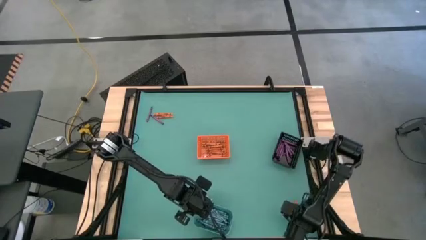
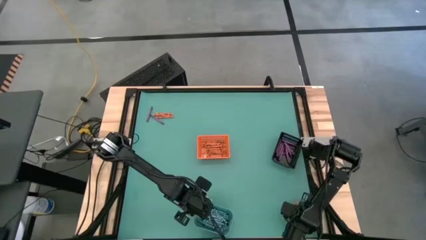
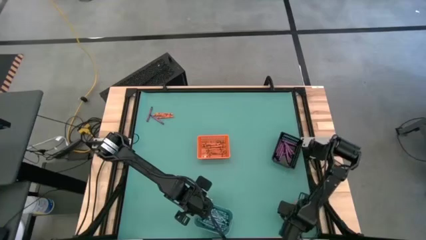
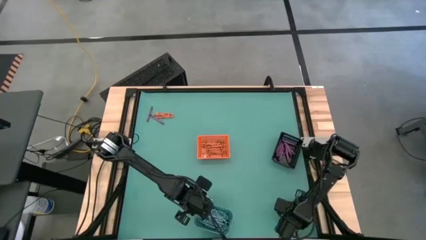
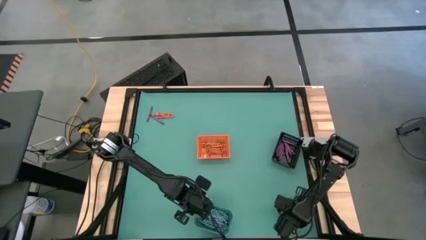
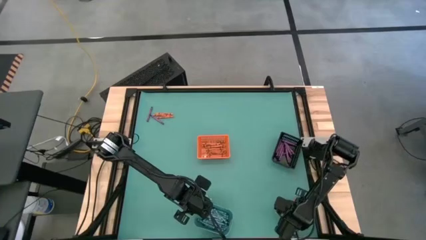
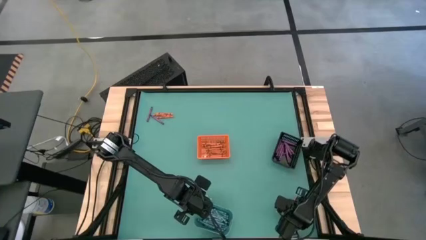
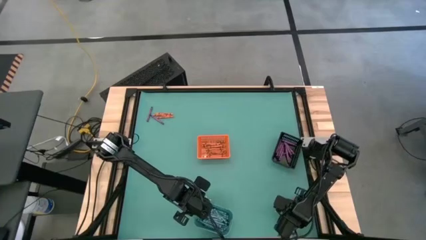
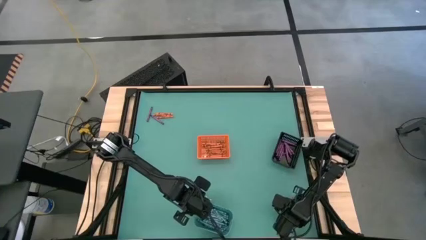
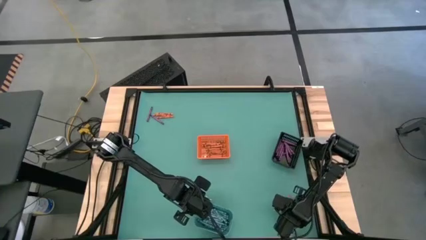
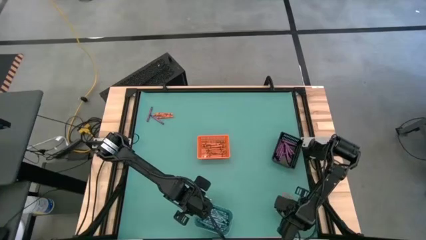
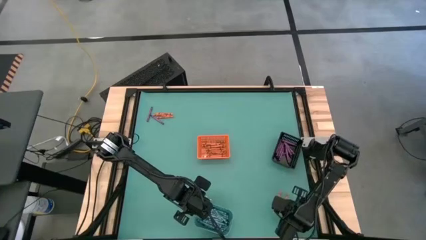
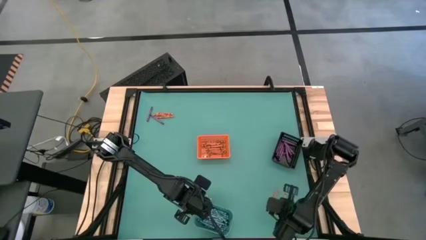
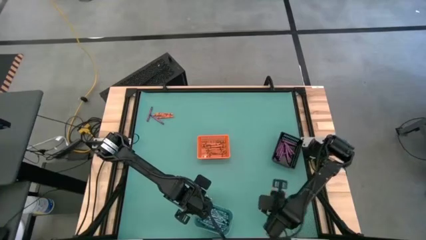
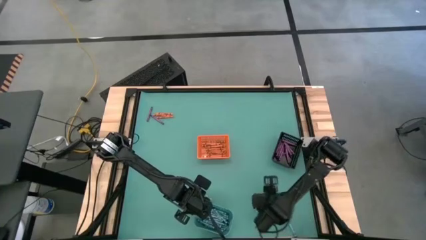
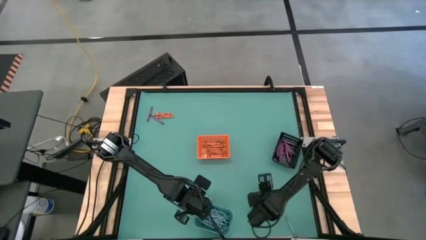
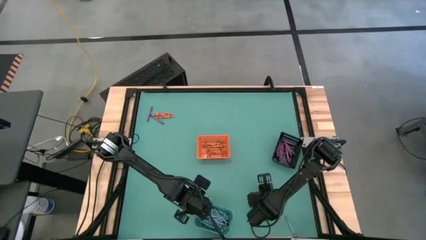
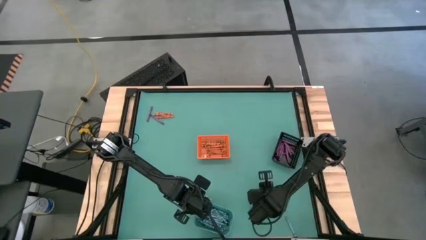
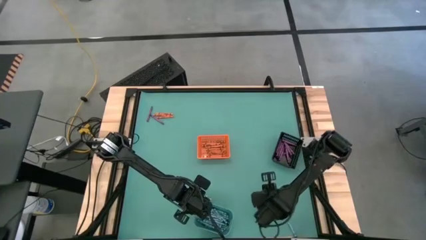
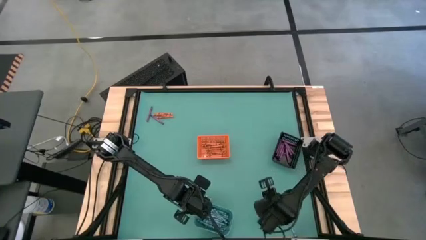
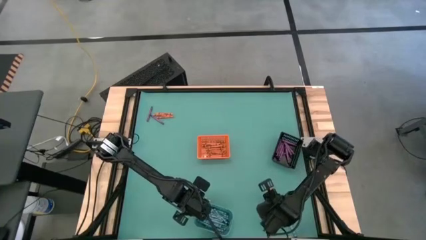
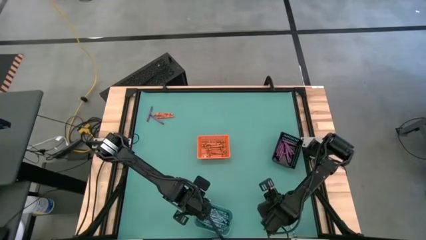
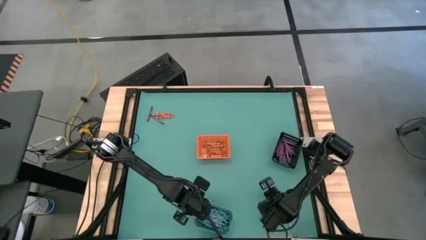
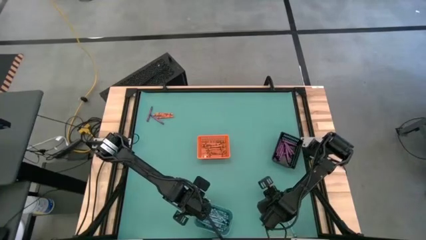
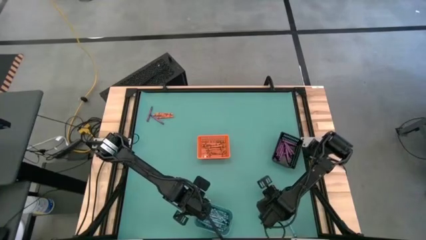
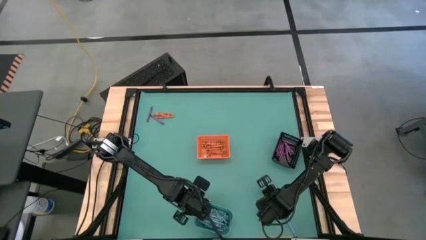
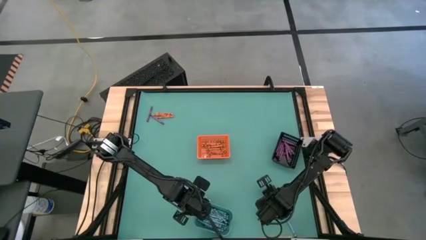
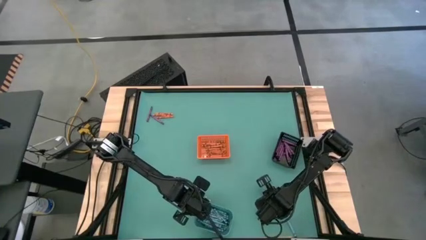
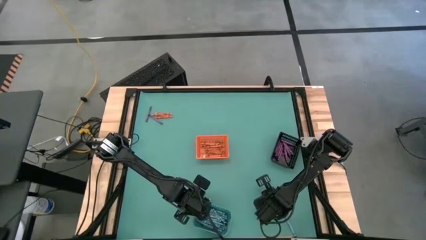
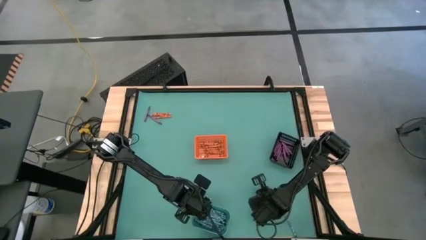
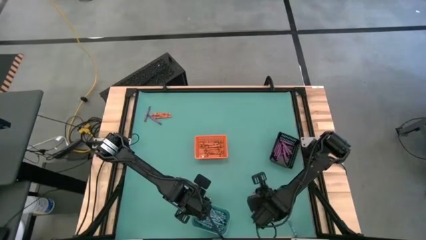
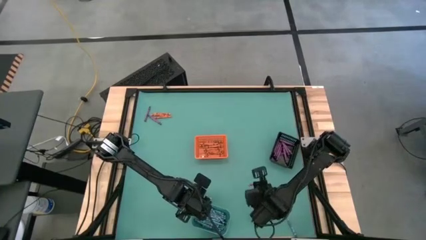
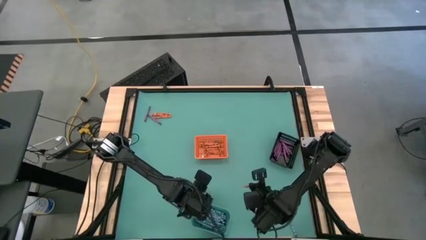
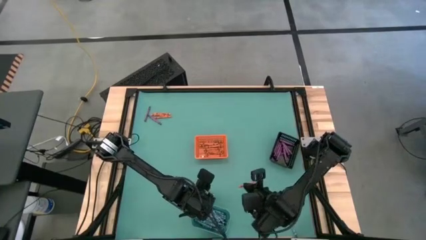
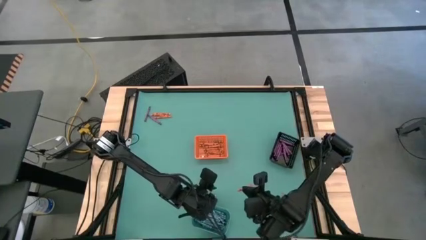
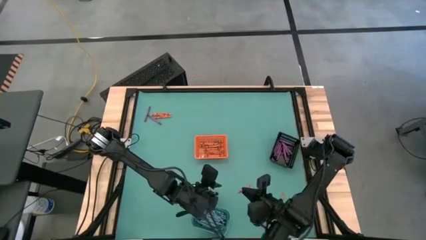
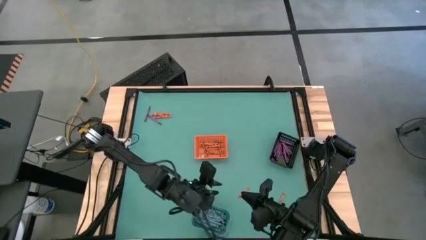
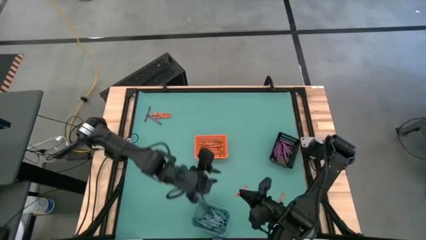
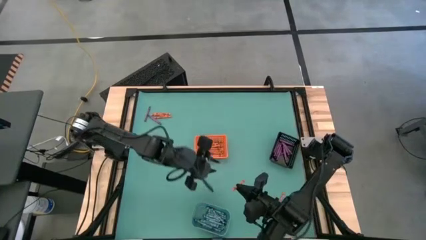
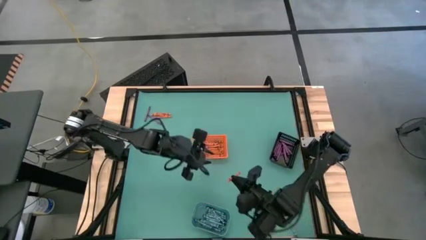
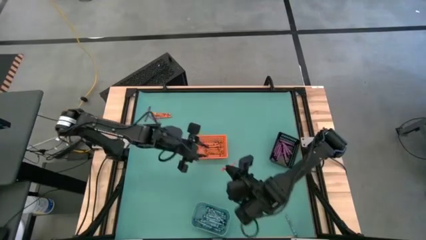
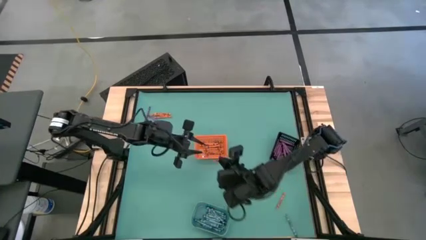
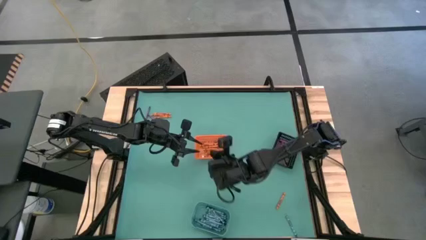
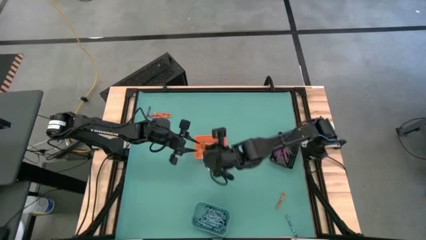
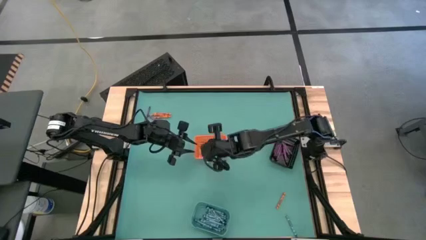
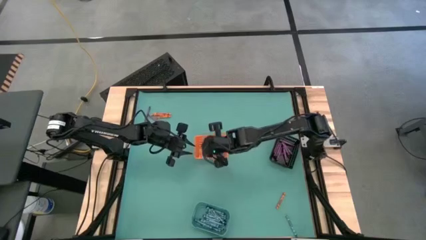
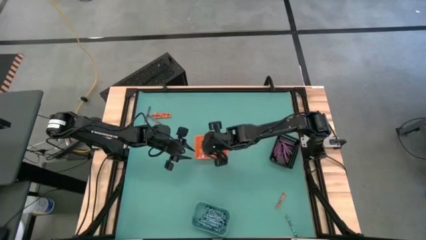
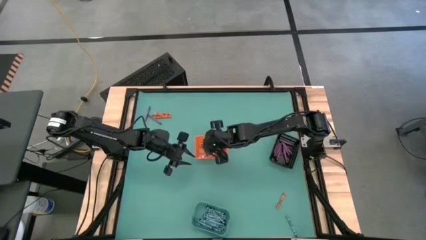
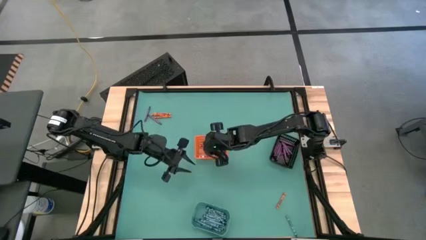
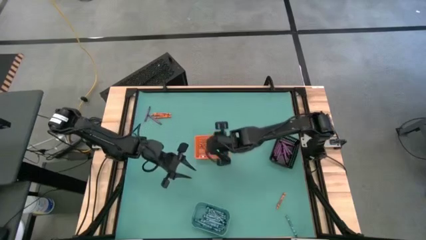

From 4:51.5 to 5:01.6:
Task: Sort crayons
Put the orange crayon into the orange bin

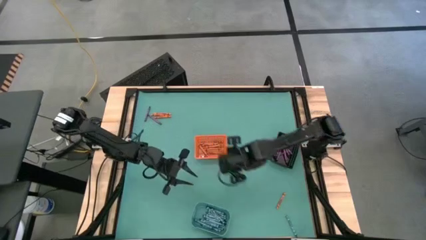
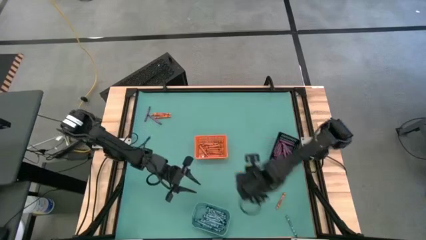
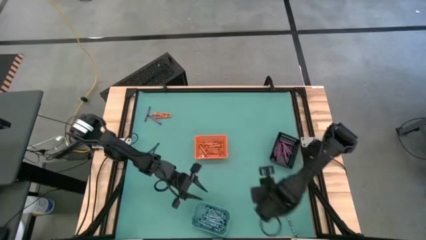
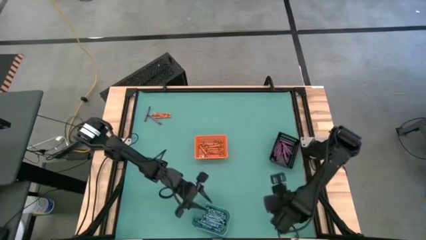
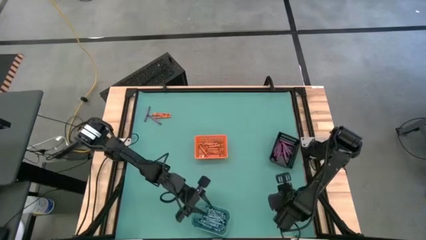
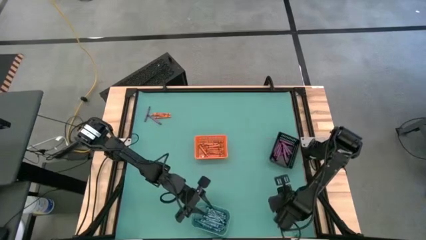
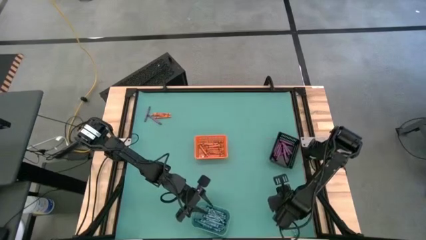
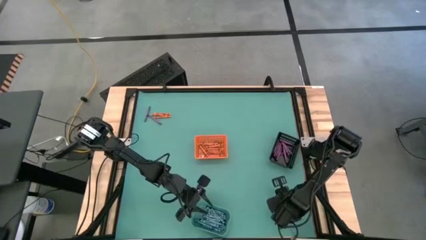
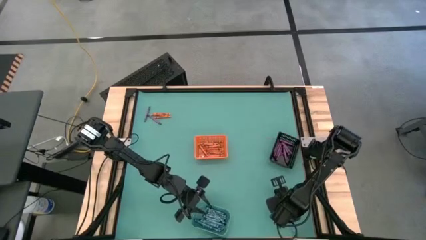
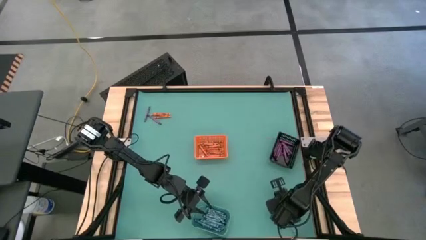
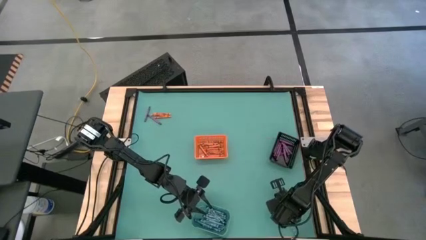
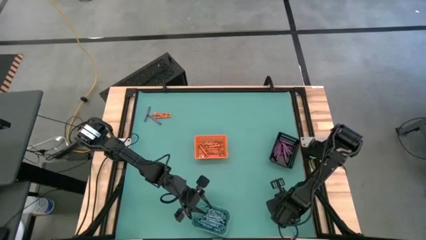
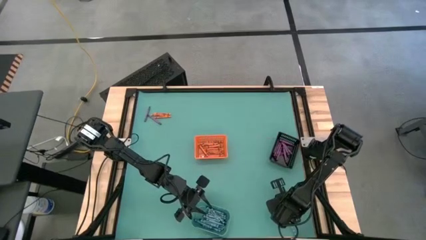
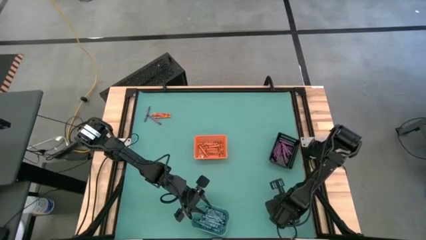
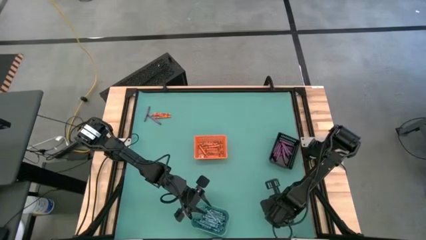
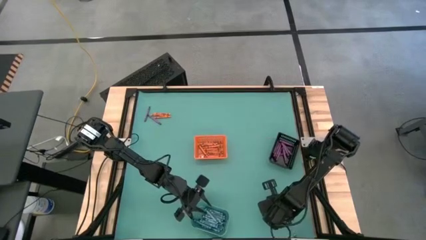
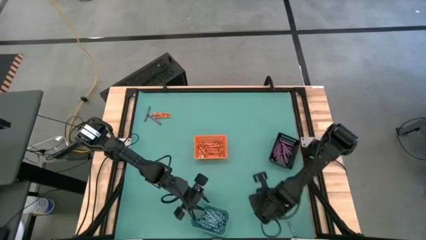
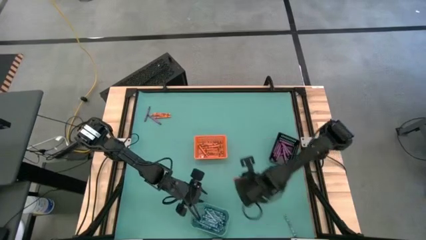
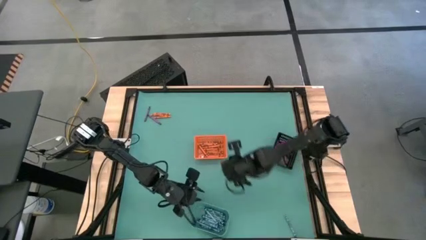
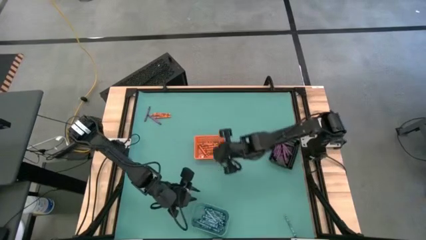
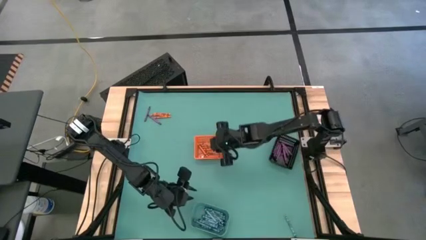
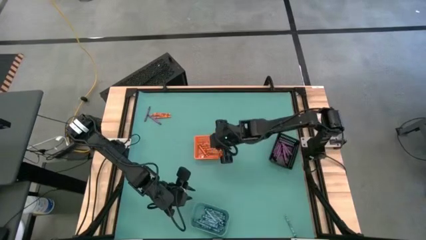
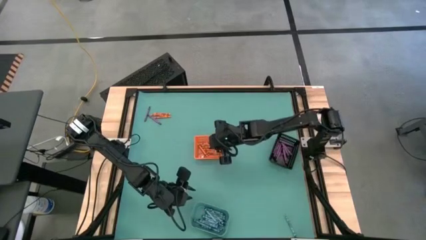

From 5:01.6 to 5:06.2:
Put the orange crayon into the orange bin

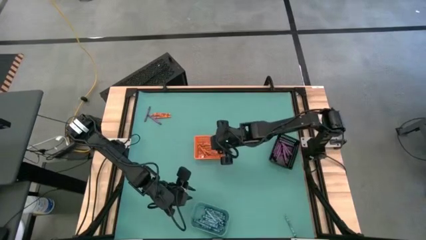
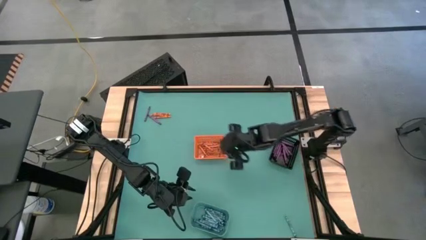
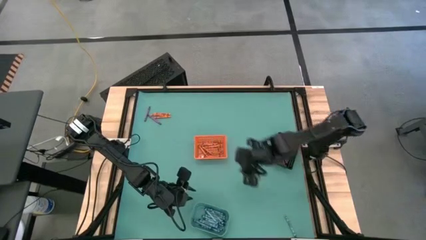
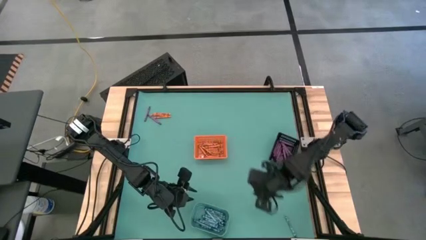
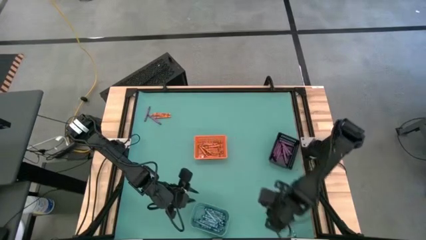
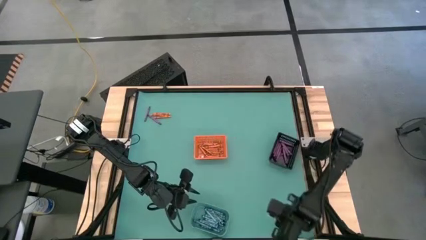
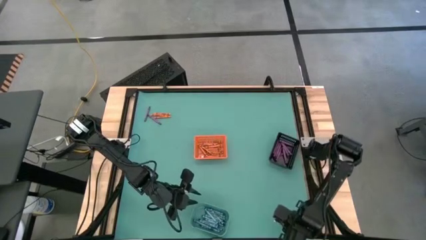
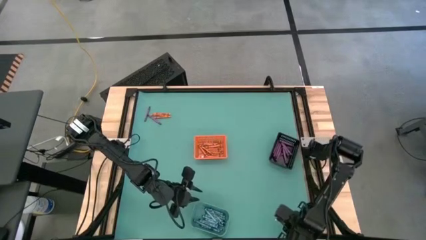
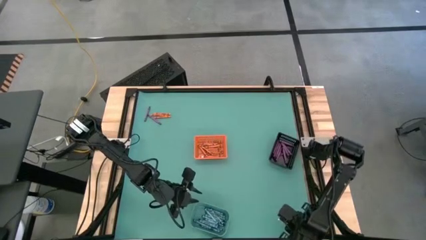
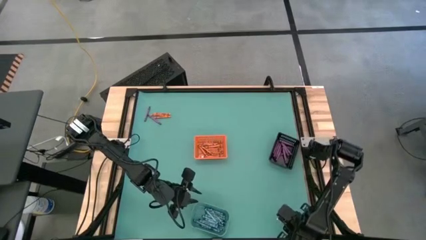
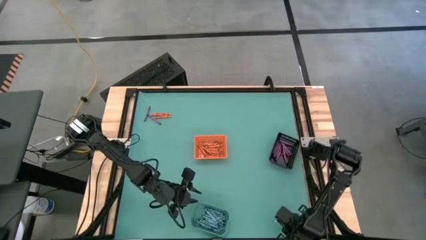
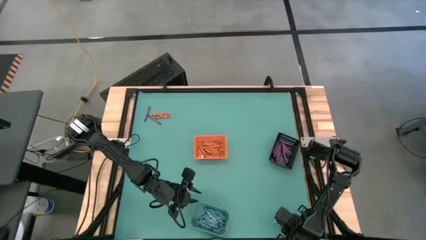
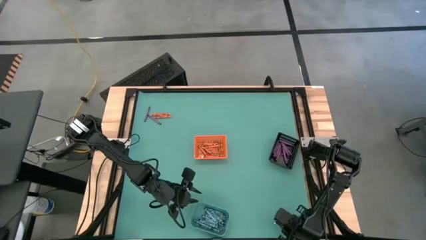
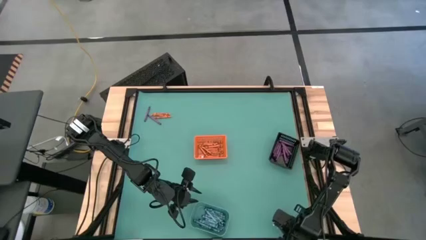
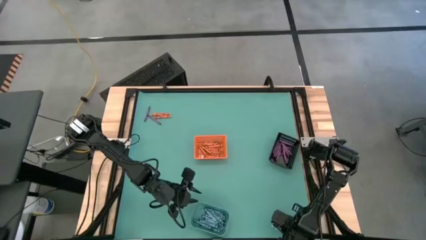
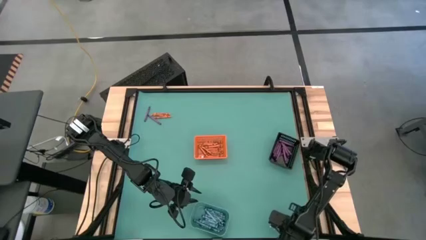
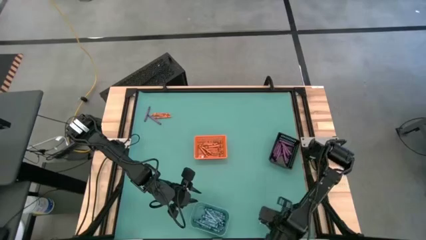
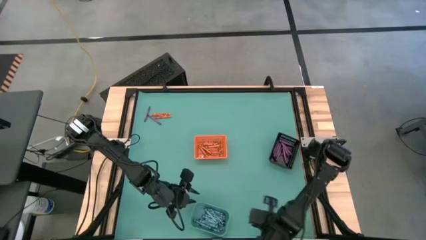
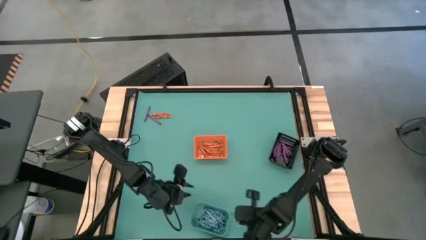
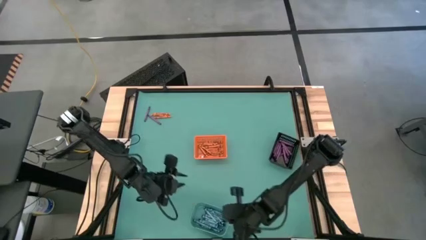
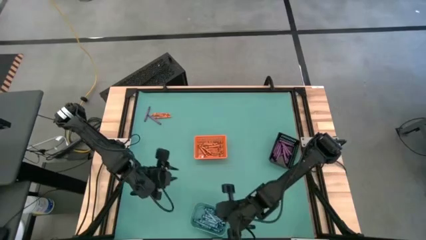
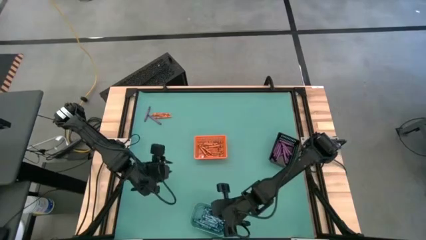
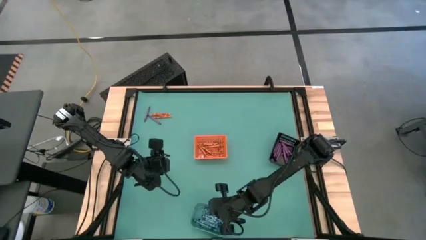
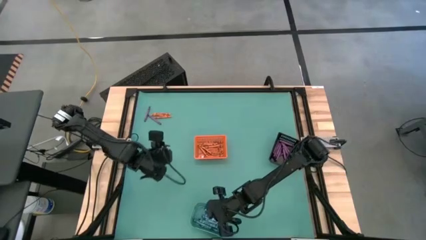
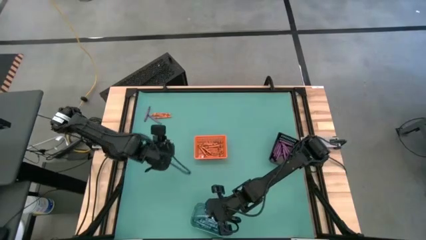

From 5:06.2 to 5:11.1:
Put the blue crayon into the blue bin
